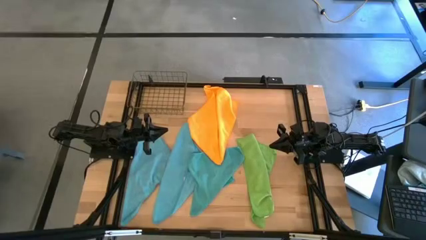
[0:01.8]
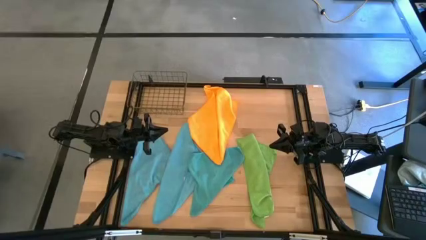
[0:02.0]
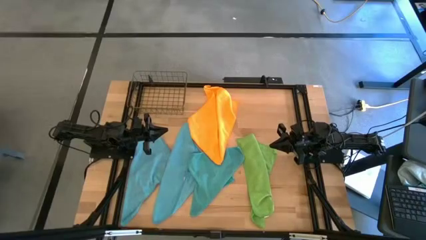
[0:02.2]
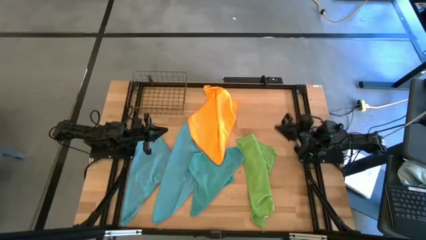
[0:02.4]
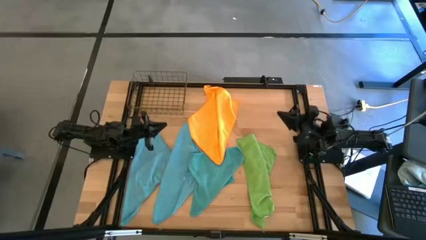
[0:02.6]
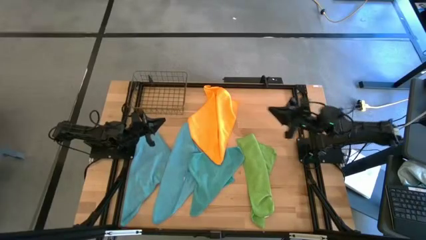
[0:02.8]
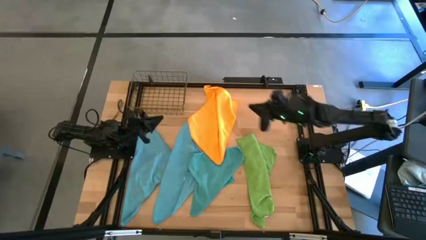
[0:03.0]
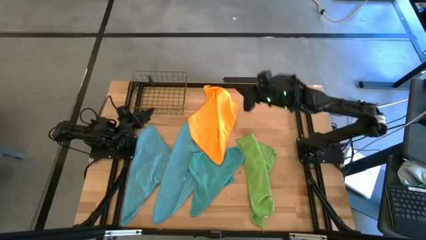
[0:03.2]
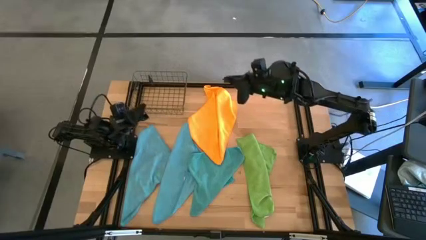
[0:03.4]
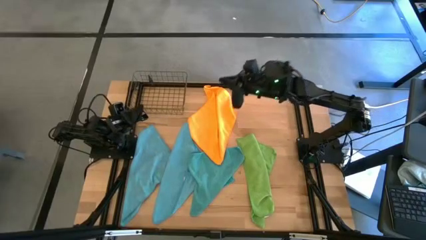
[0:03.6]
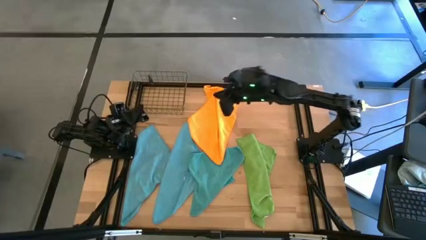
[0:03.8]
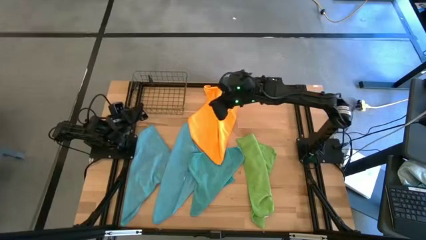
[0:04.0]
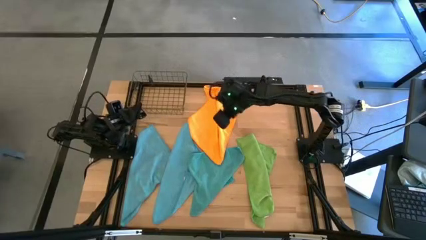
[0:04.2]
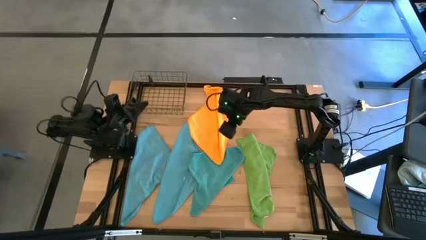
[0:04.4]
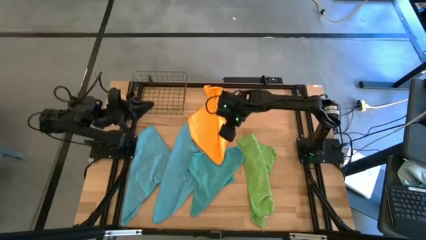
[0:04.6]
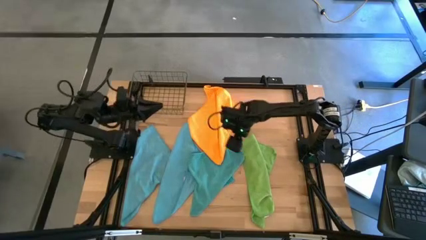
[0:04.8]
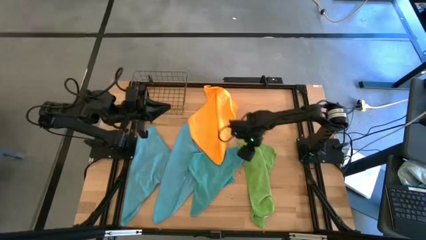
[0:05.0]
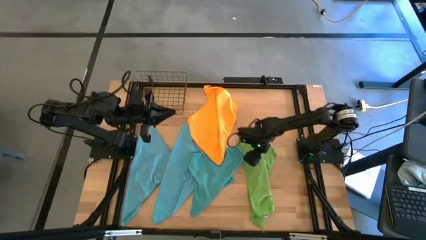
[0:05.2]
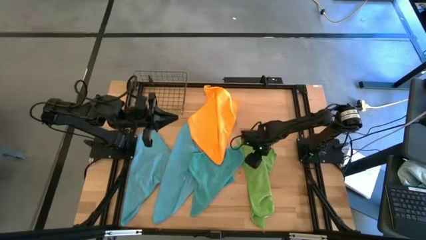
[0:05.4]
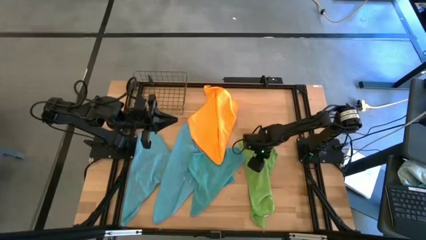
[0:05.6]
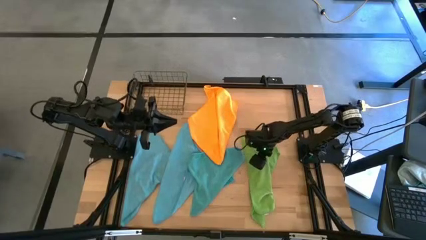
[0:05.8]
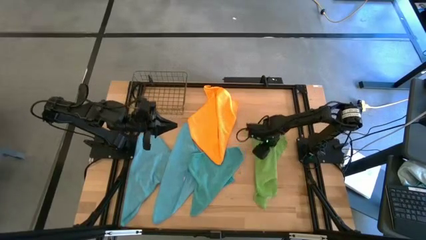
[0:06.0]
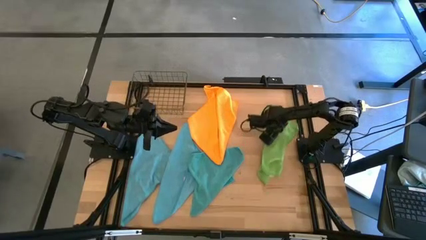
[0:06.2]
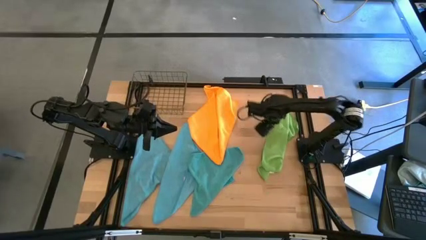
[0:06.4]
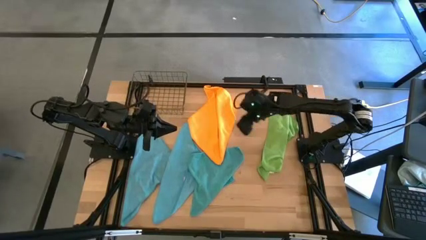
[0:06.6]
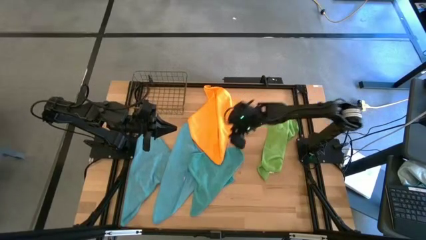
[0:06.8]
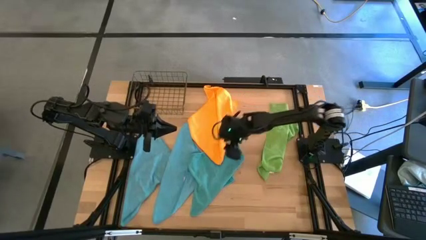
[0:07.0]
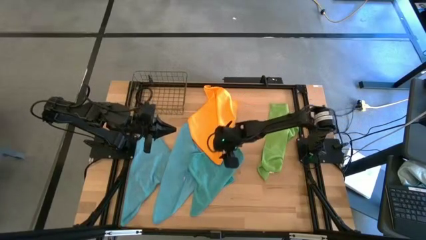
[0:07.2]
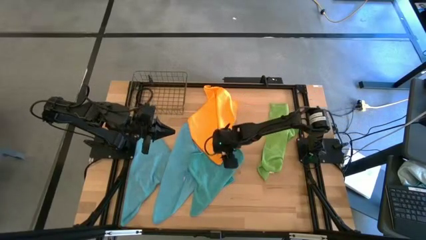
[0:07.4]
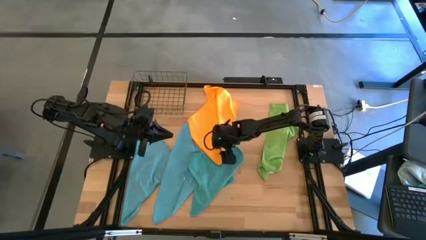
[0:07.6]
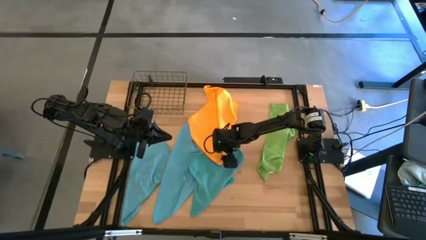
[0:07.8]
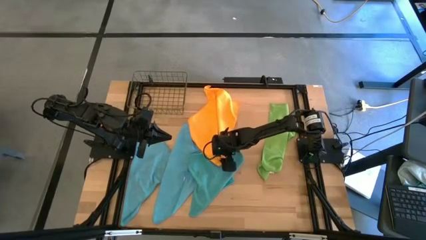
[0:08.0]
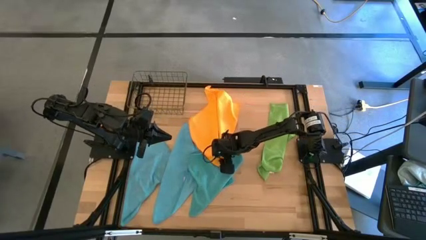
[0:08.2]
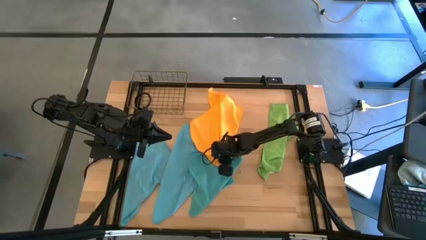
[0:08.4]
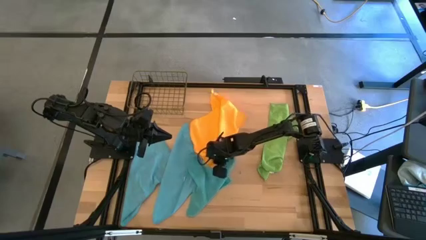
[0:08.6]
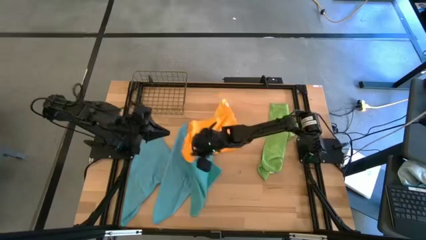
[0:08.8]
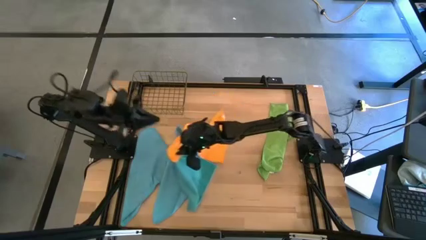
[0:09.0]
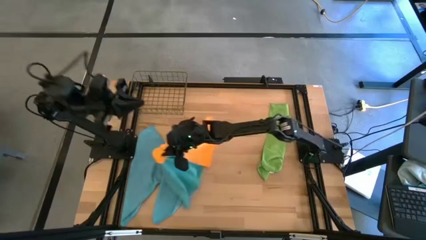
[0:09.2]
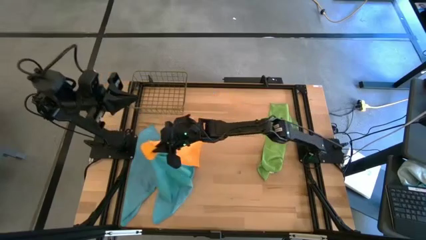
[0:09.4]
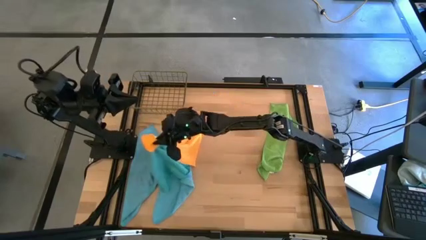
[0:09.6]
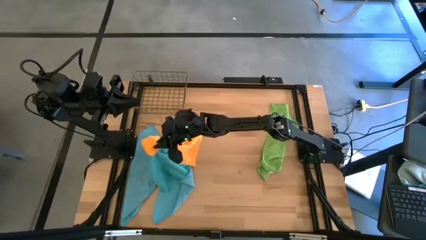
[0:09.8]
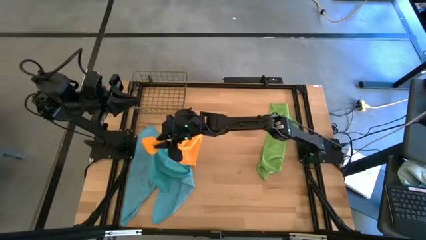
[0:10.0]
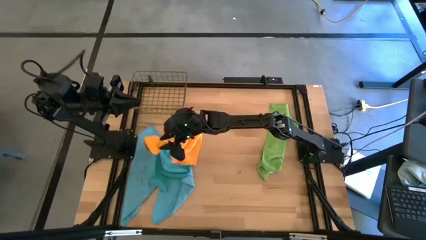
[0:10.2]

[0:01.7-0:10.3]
Task: Fold microfiber towels
Prepare the microfiber cloths on the table

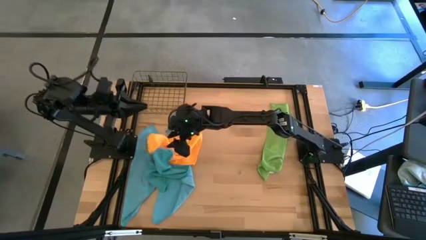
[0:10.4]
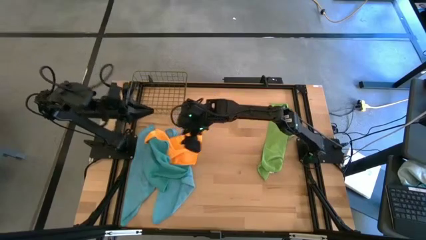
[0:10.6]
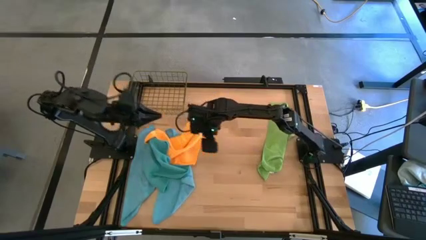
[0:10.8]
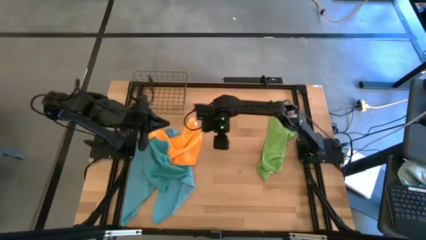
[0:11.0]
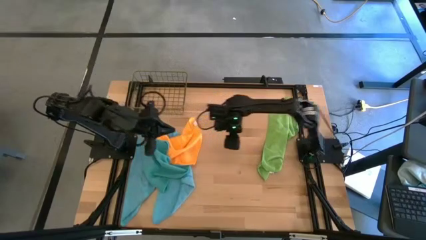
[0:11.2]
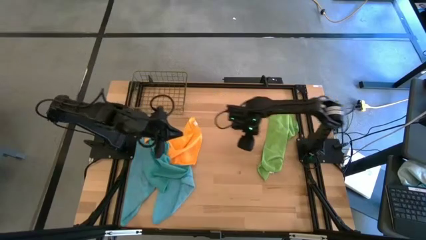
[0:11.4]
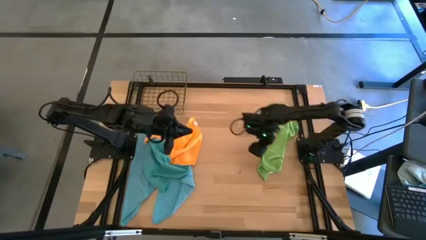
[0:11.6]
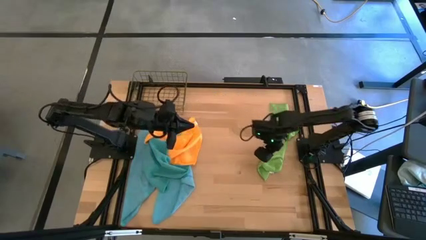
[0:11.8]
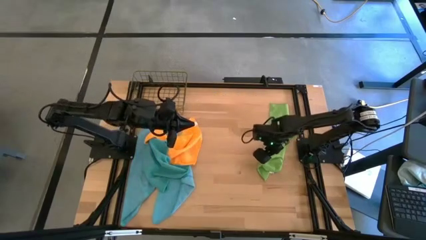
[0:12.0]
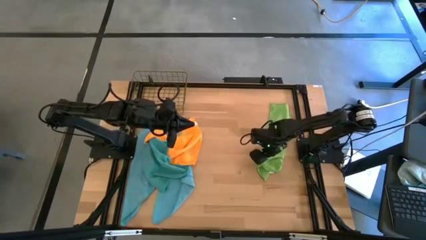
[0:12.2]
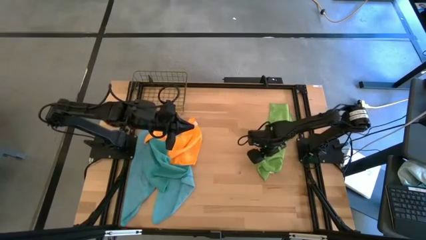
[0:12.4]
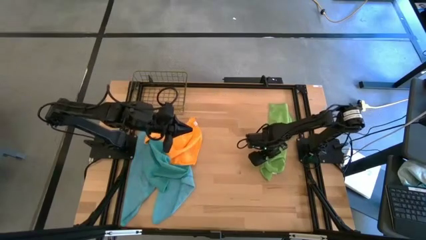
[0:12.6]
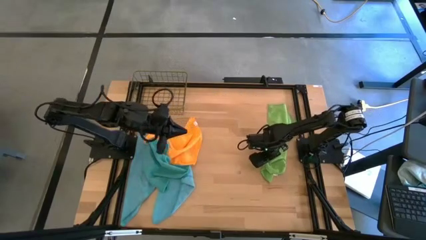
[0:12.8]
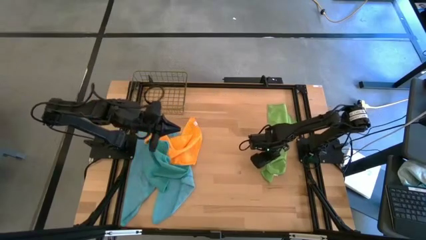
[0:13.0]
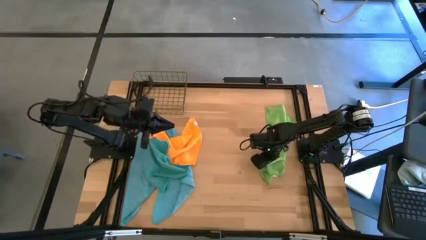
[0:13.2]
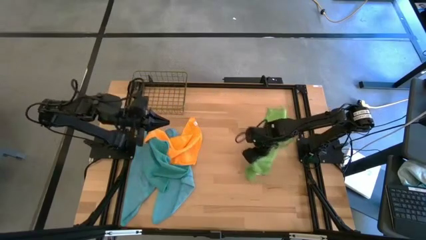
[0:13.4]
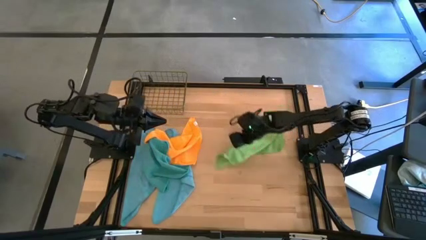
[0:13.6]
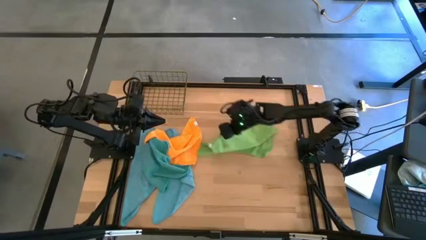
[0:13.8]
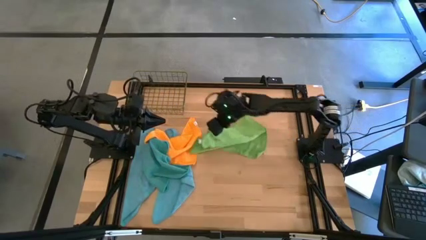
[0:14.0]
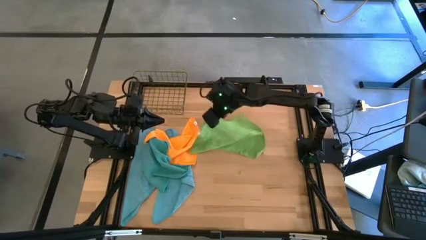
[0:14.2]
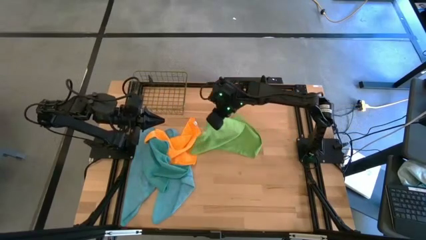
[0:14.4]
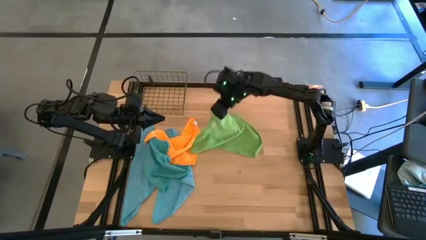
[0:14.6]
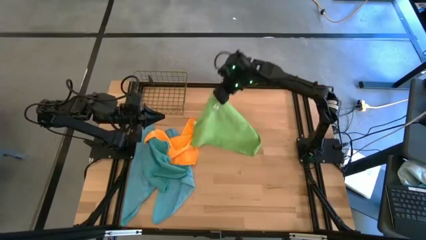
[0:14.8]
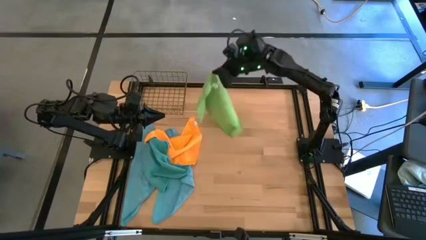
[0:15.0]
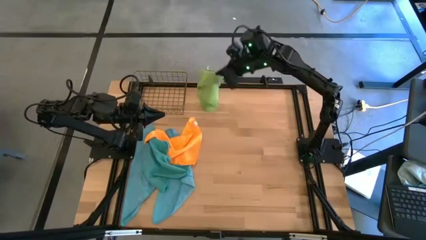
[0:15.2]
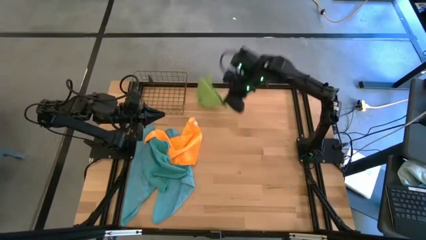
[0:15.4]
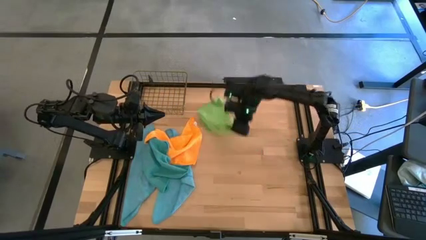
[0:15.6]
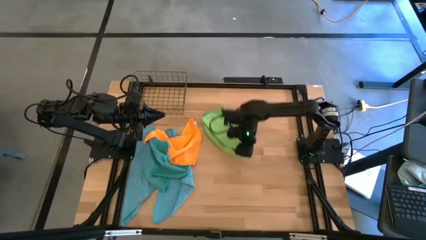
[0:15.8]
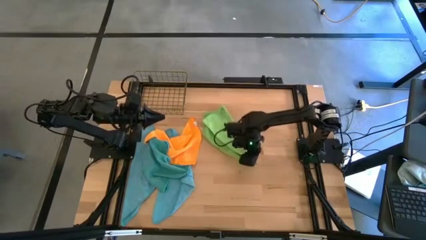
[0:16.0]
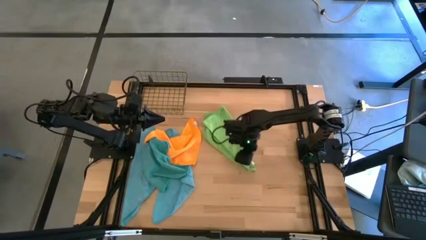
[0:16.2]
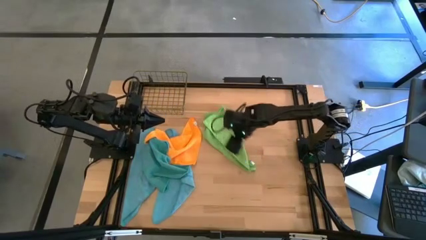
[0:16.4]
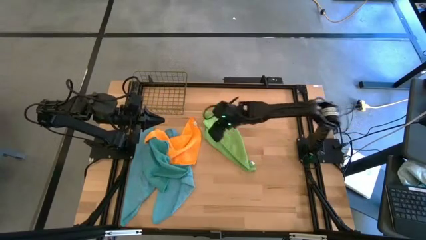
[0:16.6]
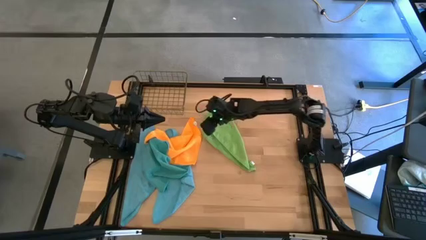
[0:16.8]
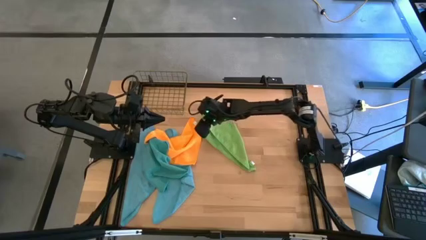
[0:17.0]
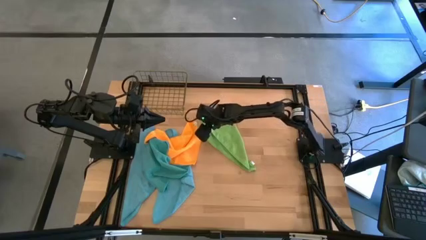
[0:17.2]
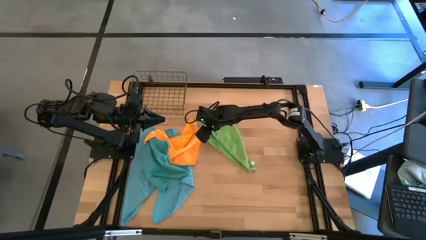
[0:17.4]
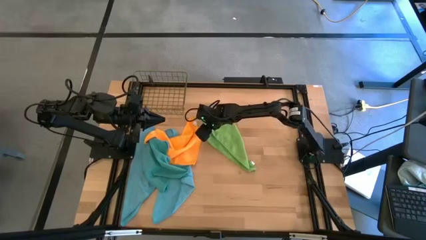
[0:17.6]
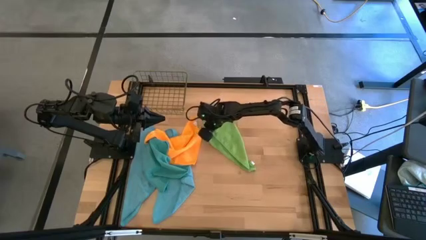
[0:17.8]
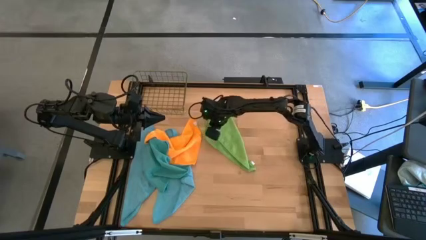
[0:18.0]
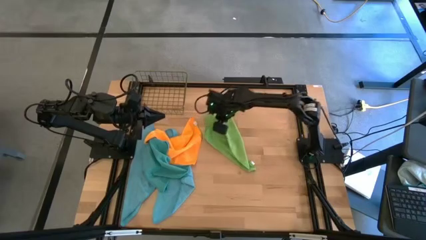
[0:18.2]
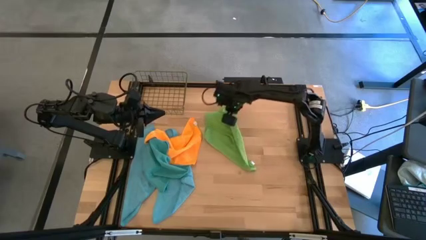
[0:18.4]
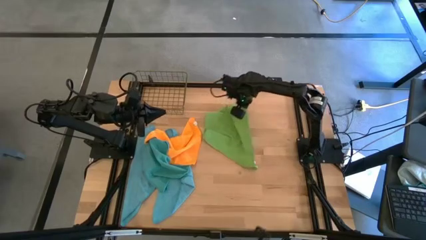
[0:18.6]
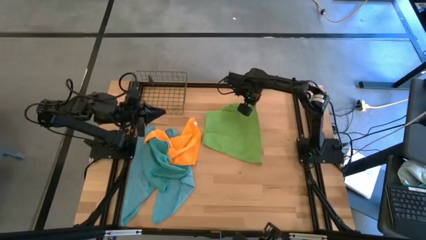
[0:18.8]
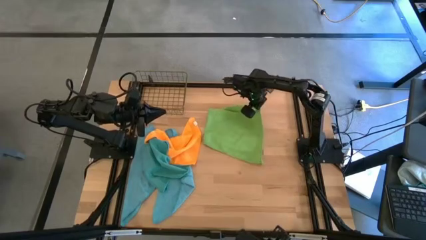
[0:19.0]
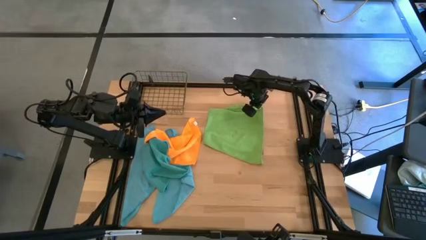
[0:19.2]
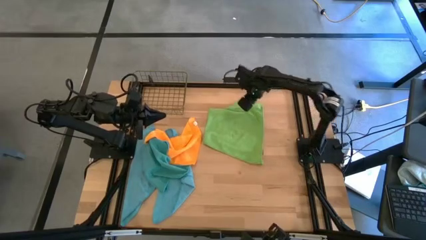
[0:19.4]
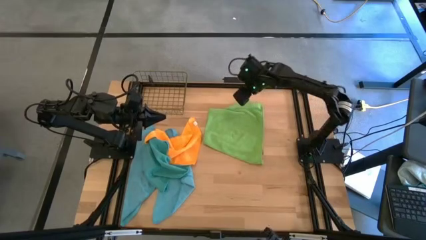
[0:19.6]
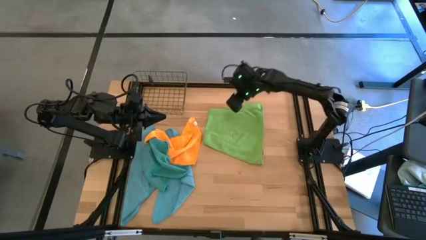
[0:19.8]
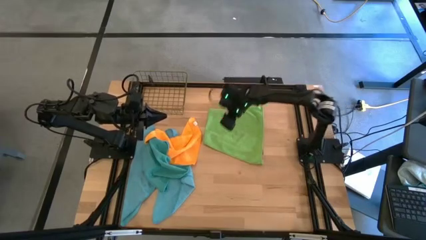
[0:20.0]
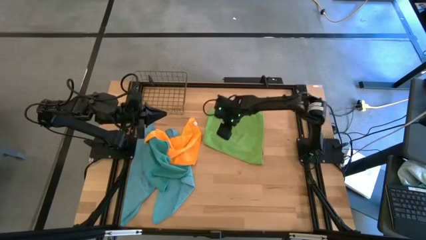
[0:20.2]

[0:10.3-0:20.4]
Fold the green microfiber cloth
